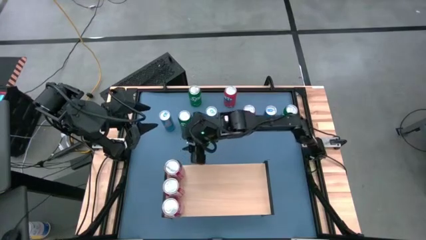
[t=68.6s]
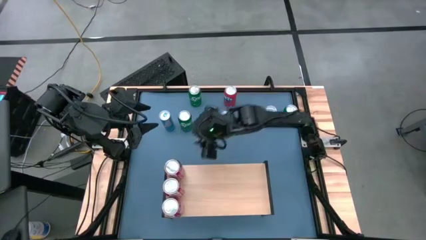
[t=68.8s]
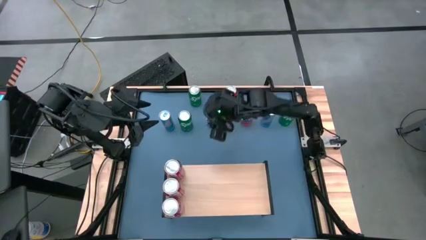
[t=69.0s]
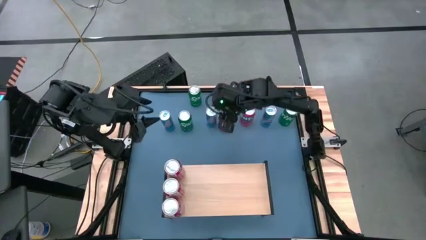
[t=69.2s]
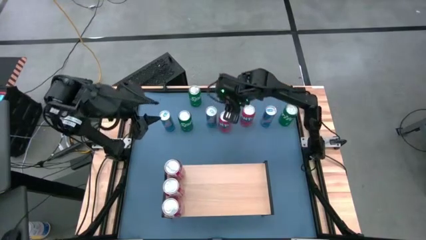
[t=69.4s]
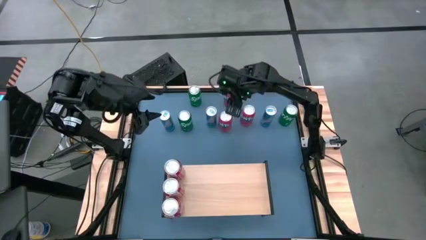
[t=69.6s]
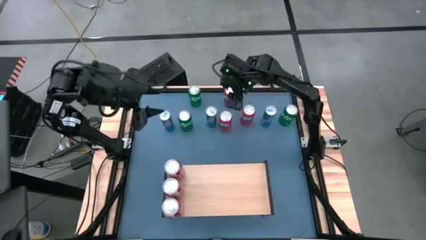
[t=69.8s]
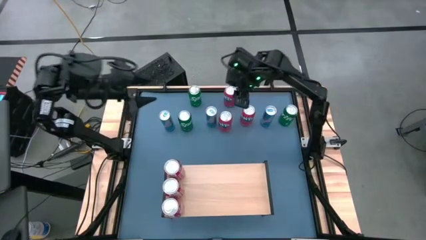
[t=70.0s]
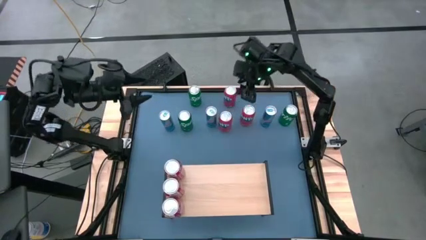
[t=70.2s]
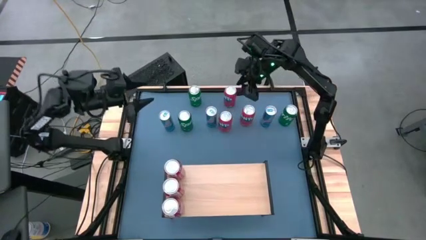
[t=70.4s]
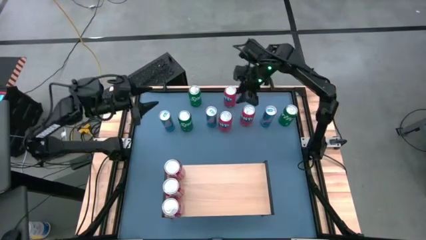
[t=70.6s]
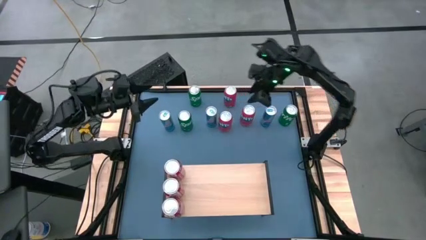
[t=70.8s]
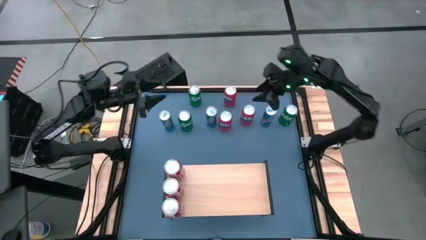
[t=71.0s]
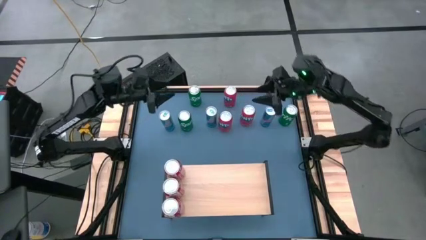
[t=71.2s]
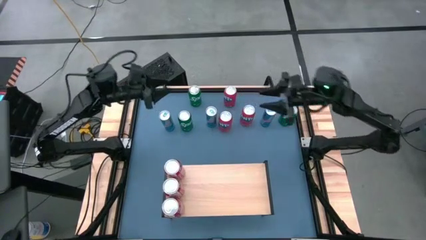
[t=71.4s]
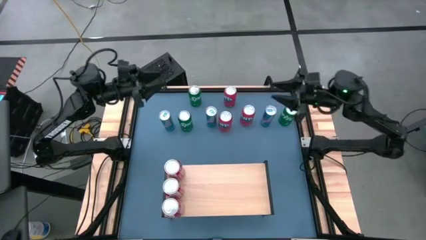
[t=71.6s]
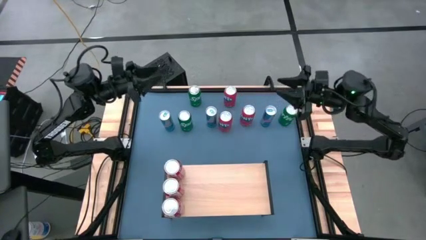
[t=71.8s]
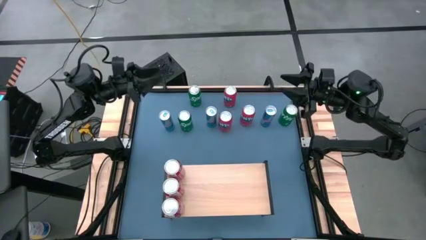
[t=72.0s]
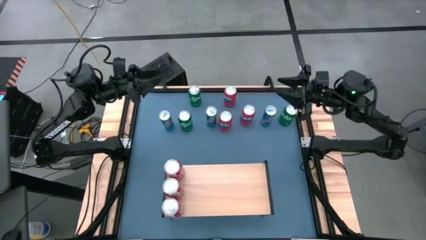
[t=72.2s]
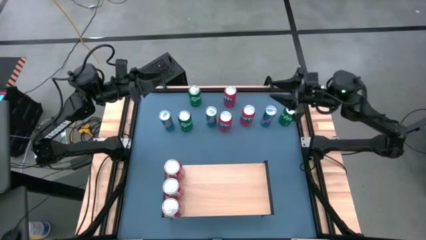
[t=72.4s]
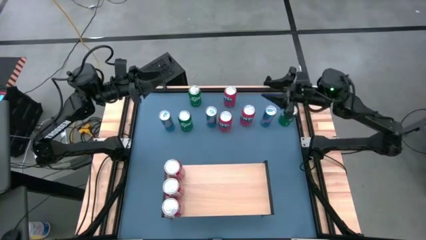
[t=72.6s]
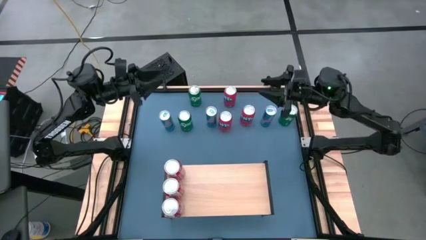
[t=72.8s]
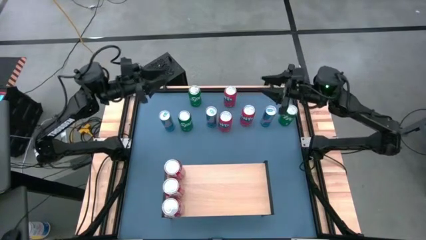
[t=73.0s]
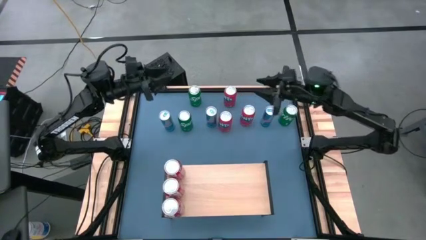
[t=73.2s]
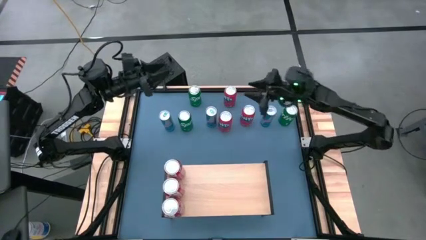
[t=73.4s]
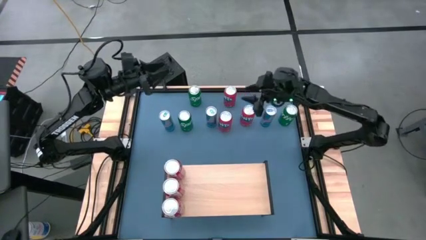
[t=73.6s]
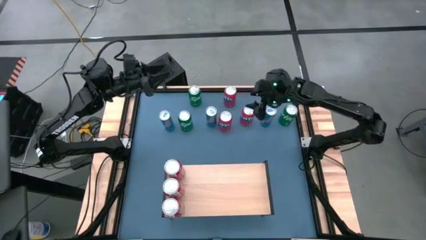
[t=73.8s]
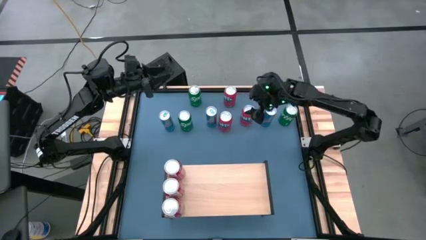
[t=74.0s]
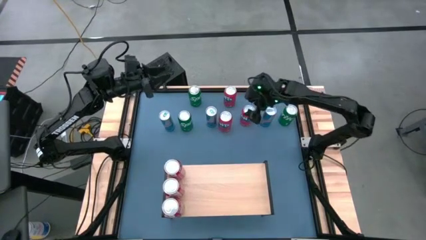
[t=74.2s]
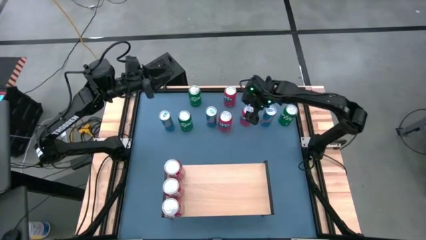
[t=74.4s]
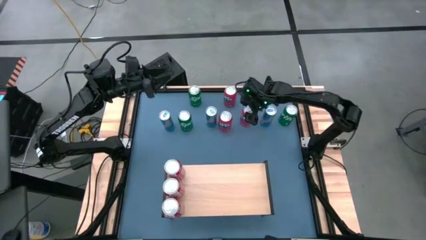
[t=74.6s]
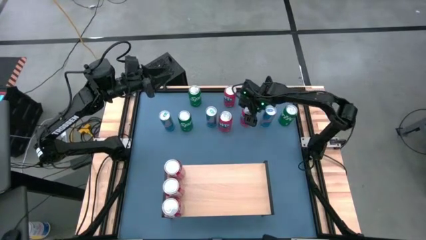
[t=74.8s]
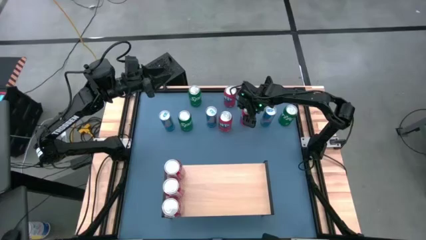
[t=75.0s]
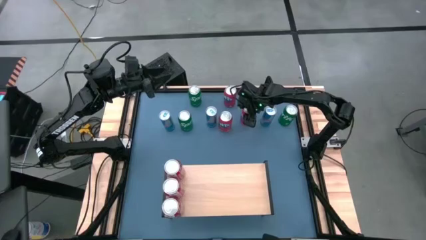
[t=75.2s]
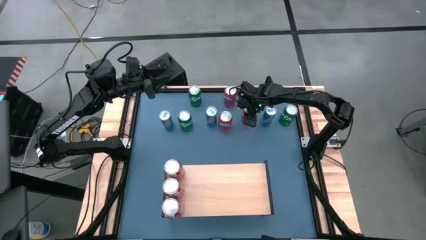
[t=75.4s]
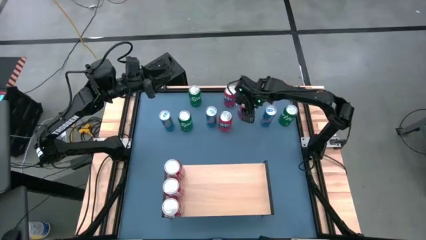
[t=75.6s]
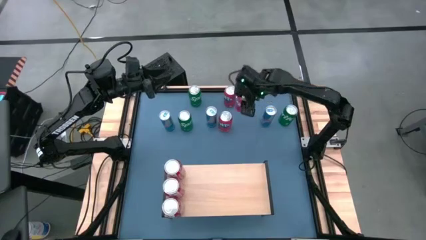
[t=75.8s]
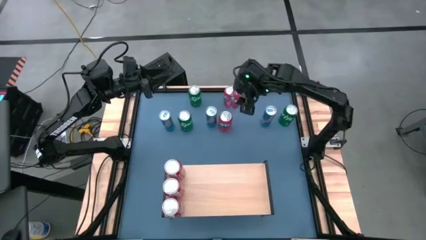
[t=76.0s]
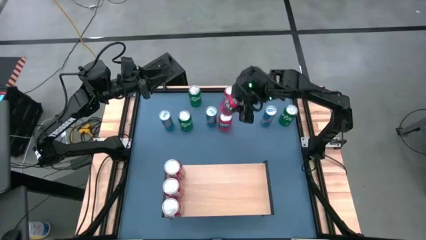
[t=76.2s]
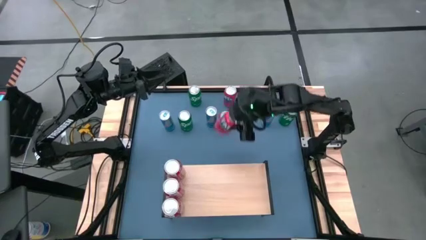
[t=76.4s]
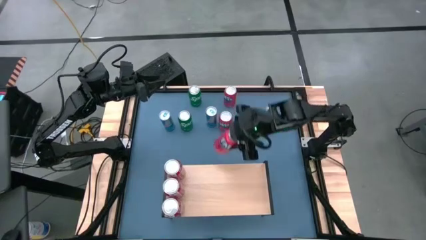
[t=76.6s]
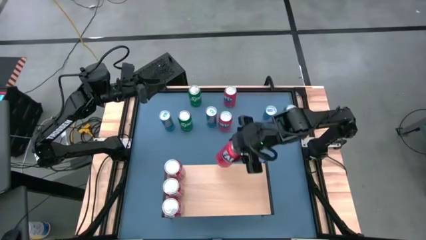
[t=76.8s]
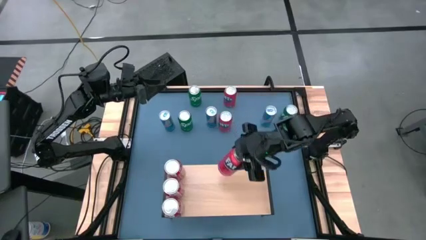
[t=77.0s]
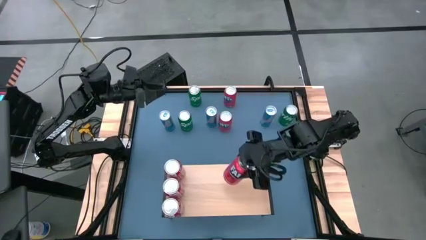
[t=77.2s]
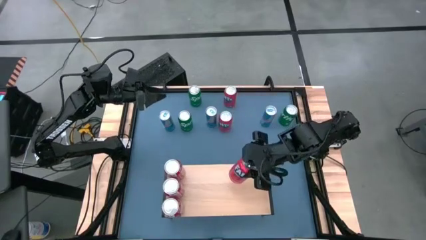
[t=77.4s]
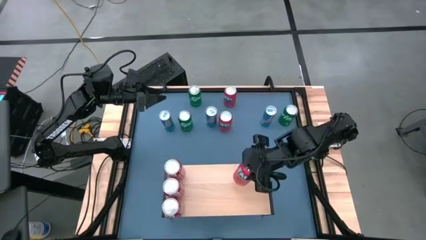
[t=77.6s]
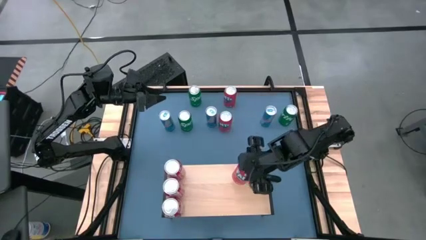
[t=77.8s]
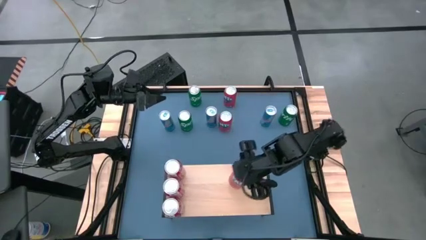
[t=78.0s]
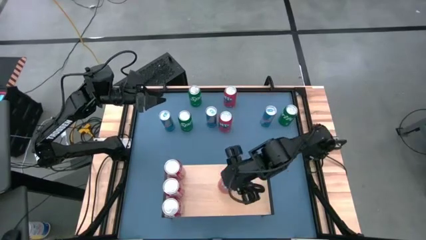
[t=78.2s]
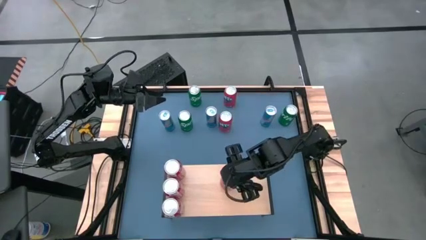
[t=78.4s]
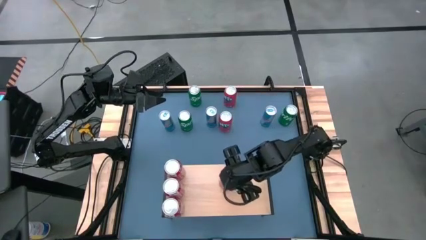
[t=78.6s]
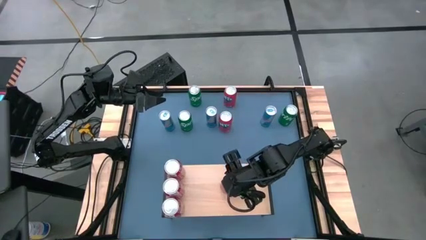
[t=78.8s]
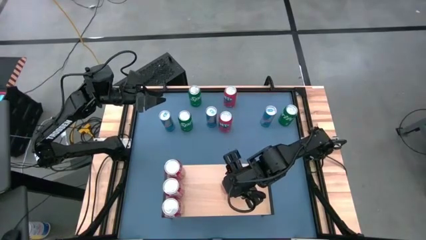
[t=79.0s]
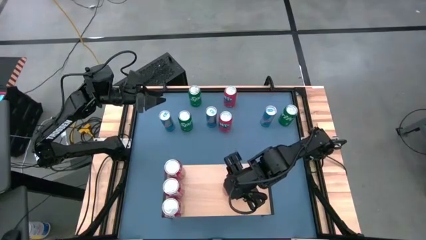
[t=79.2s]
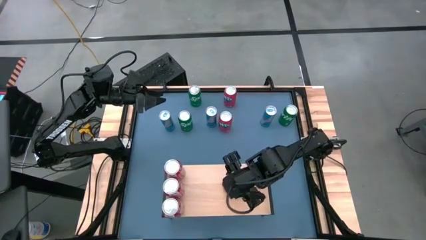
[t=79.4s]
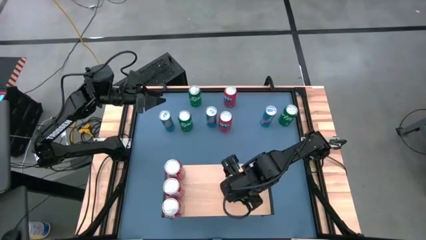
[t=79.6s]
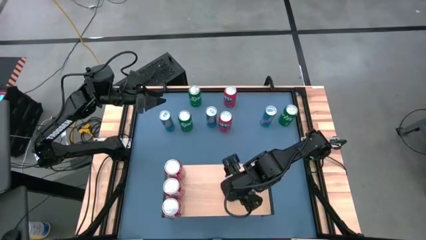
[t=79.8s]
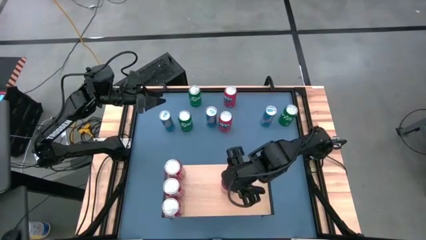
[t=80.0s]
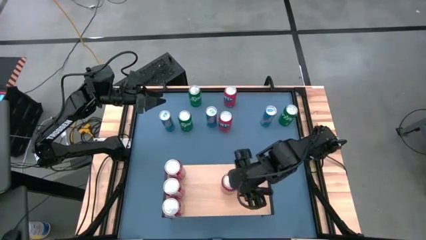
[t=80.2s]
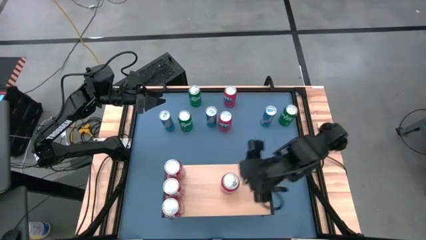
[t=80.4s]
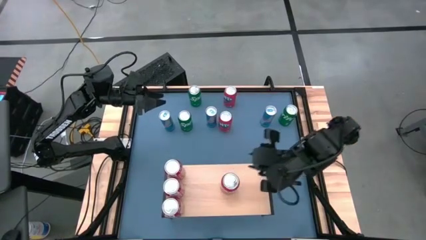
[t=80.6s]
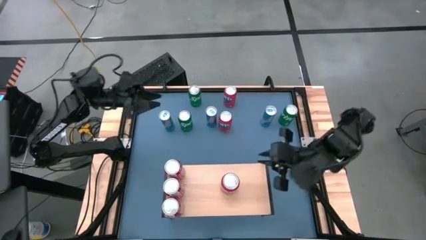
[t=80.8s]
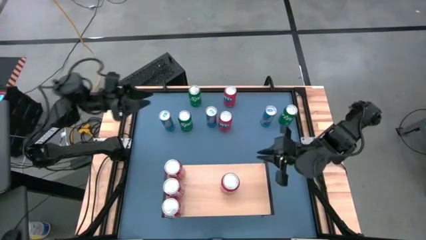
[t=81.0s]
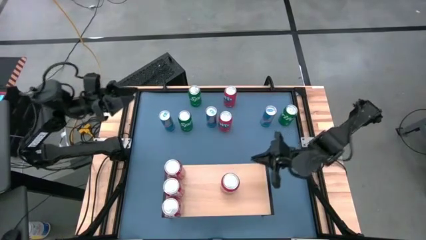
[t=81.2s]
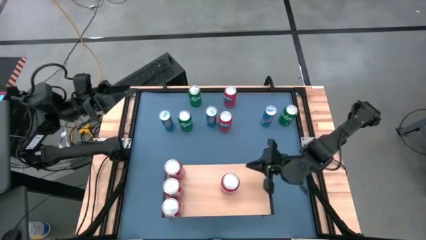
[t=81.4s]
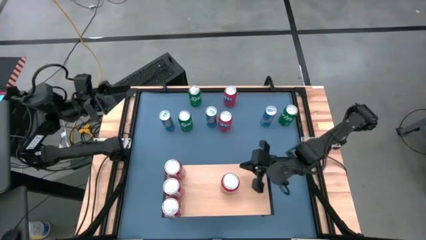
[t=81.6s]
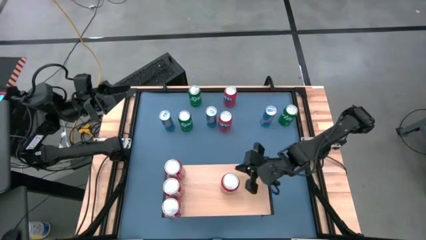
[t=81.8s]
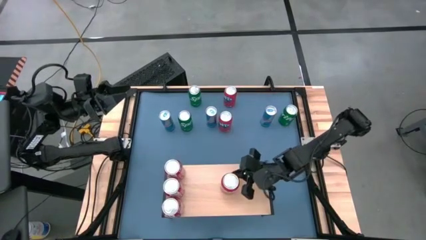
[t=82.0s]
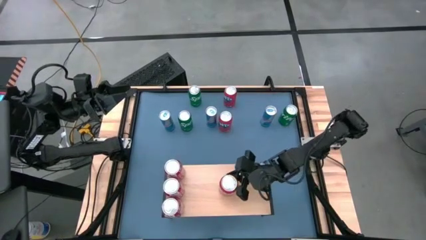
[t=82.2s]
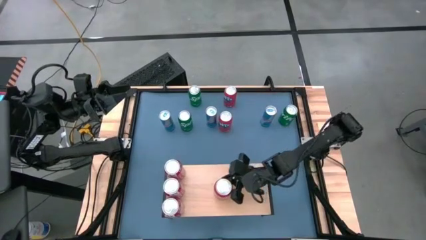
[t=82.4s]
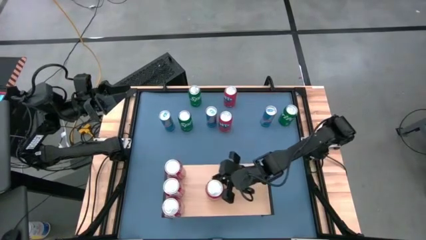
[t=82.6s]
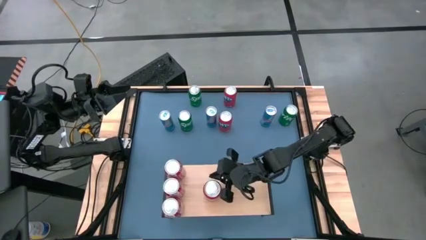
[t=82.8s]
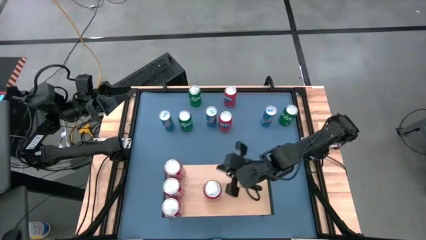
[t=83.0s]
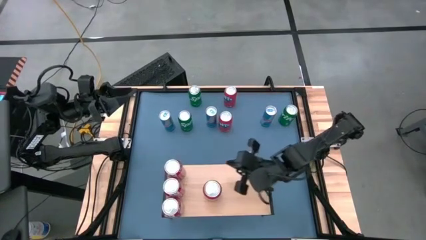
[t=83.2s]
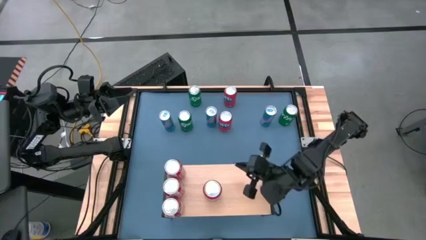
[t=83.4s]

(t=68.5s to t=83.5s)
Task: Place canned beverage on shelf
Put the right orange soda can on the shelf
